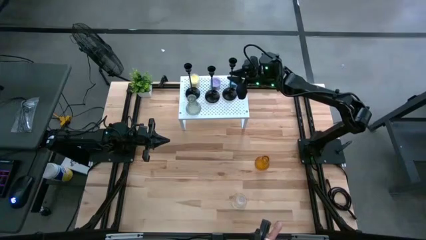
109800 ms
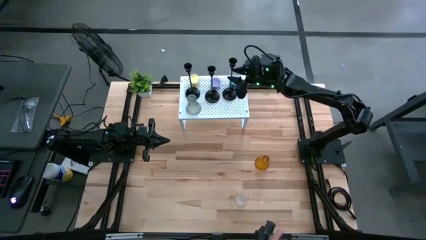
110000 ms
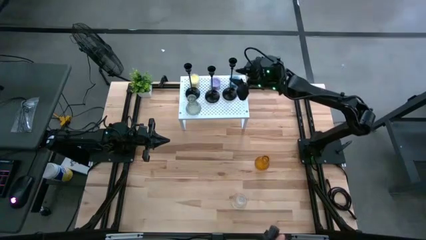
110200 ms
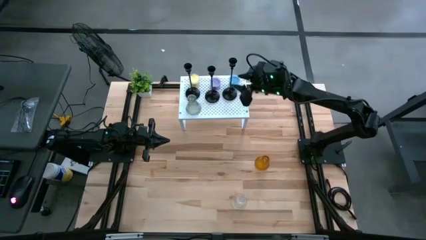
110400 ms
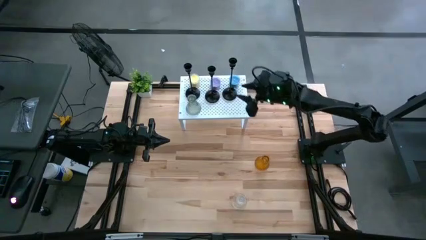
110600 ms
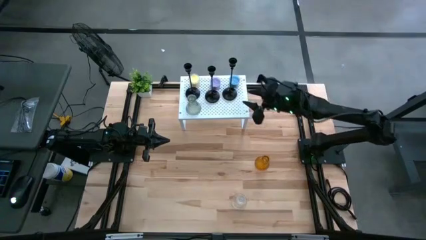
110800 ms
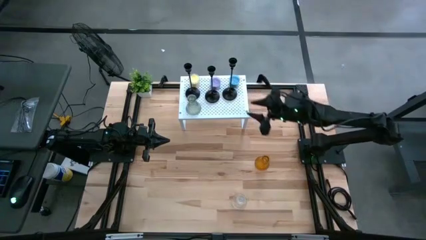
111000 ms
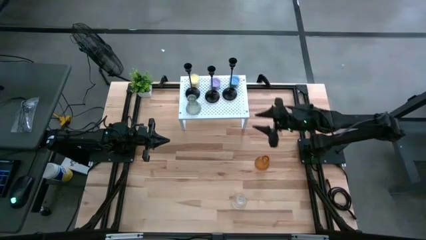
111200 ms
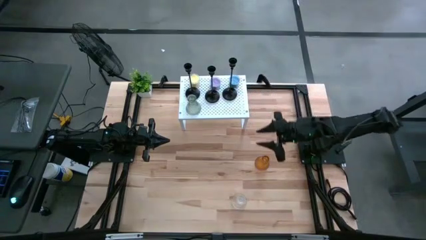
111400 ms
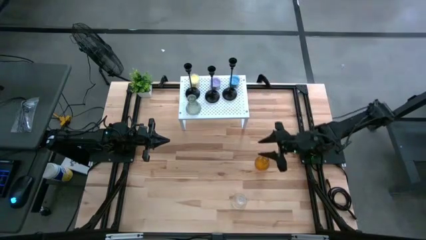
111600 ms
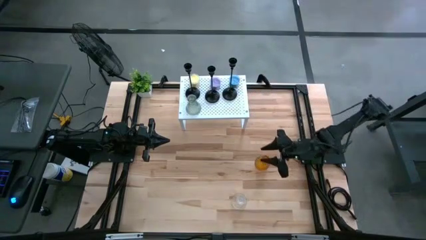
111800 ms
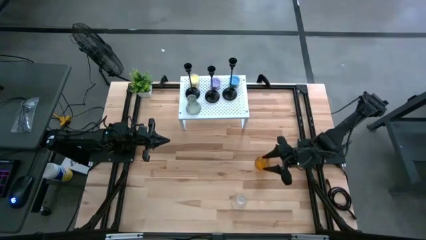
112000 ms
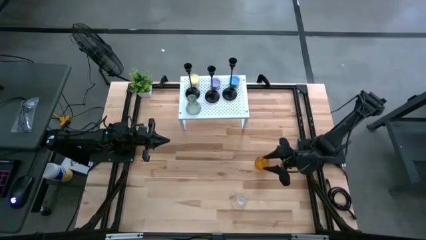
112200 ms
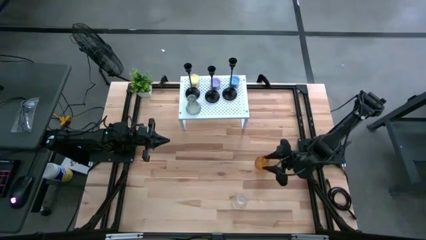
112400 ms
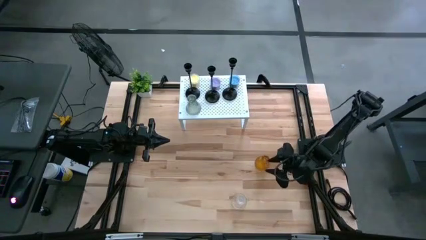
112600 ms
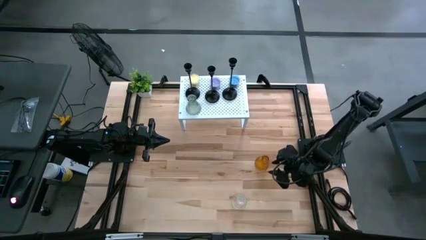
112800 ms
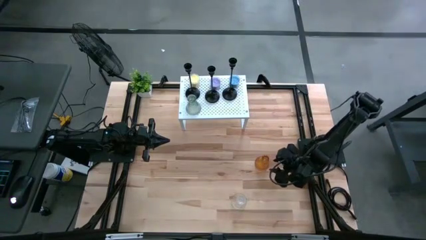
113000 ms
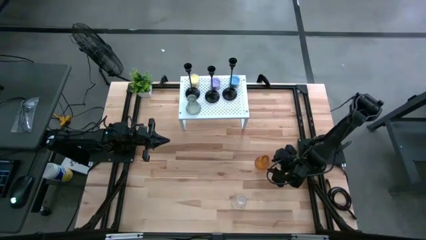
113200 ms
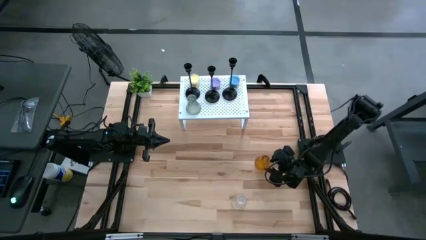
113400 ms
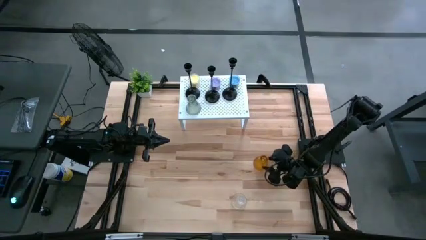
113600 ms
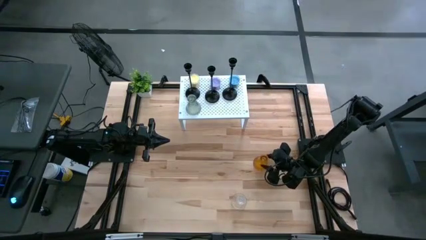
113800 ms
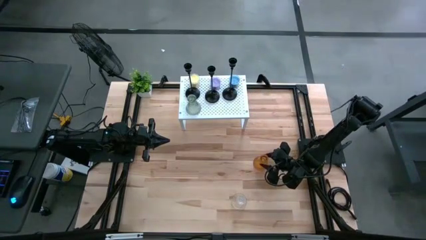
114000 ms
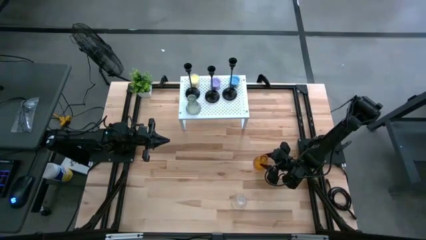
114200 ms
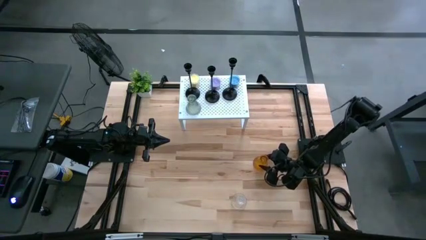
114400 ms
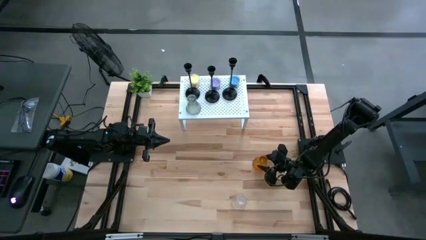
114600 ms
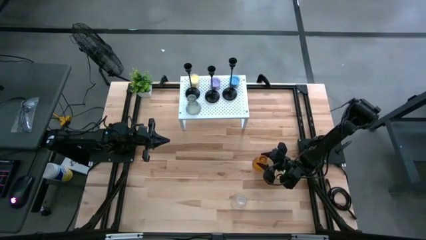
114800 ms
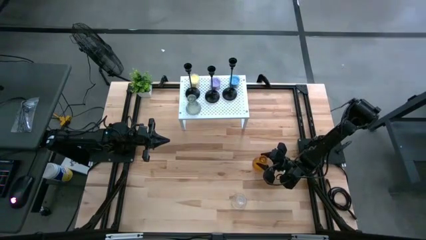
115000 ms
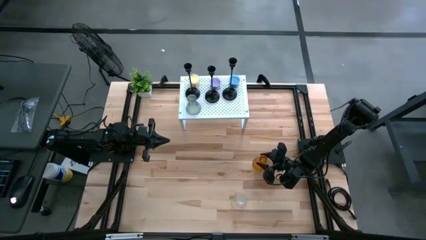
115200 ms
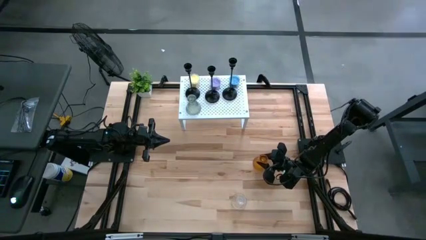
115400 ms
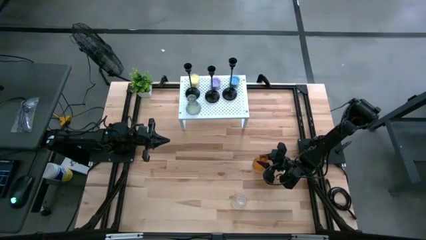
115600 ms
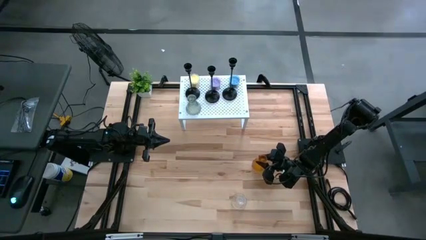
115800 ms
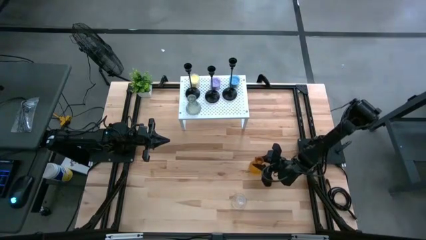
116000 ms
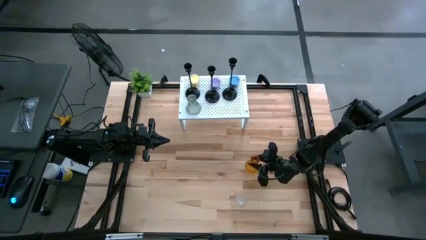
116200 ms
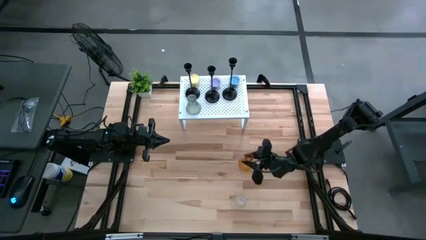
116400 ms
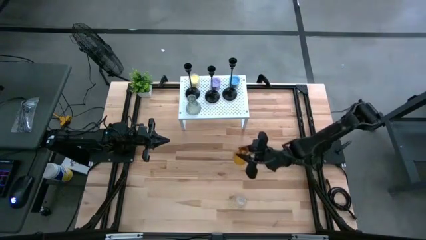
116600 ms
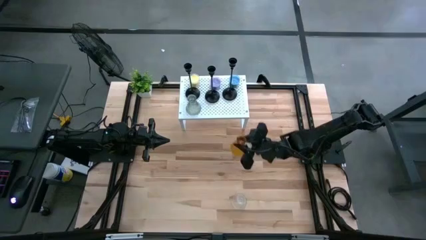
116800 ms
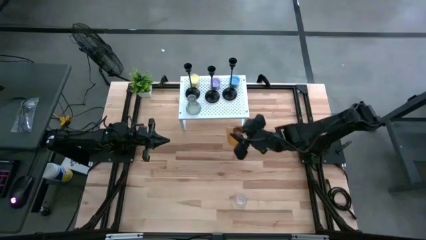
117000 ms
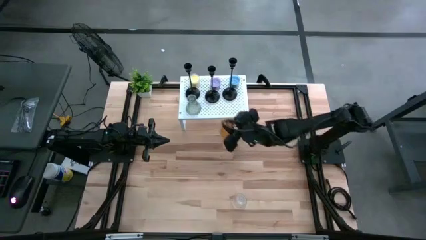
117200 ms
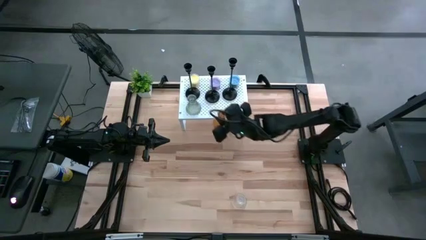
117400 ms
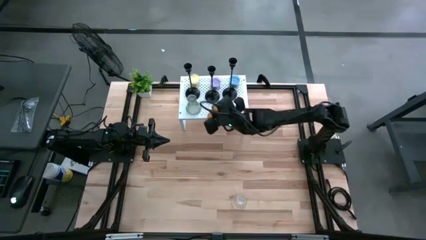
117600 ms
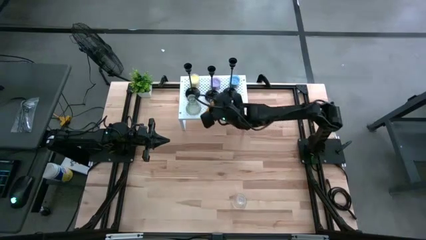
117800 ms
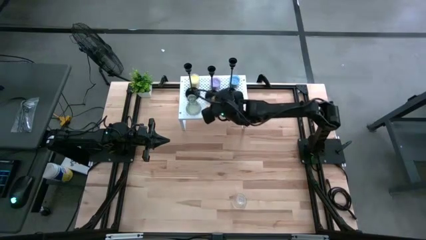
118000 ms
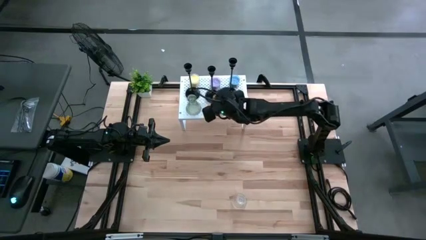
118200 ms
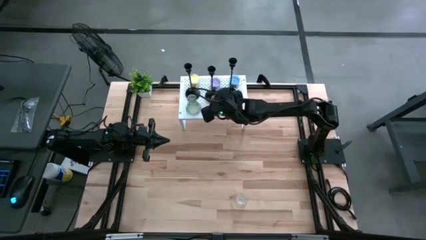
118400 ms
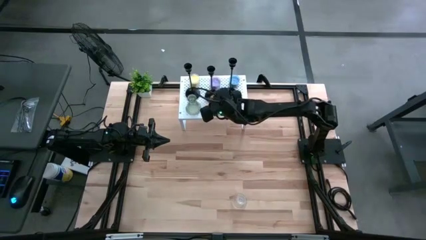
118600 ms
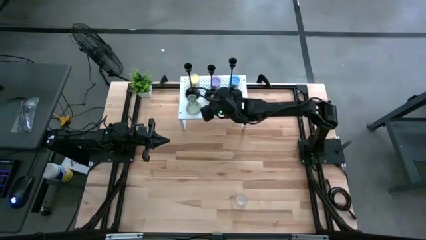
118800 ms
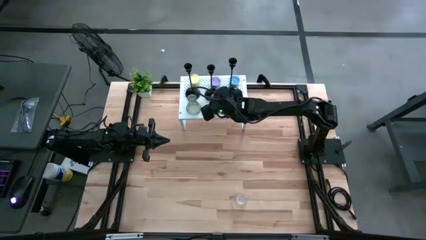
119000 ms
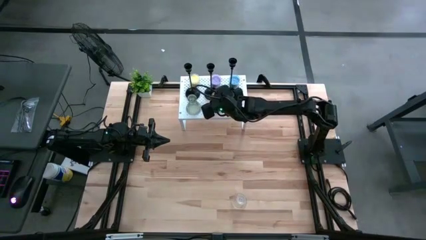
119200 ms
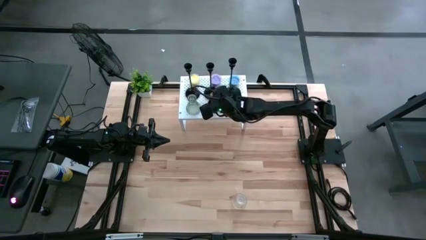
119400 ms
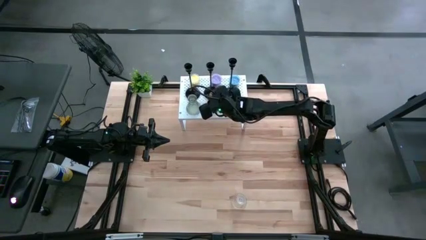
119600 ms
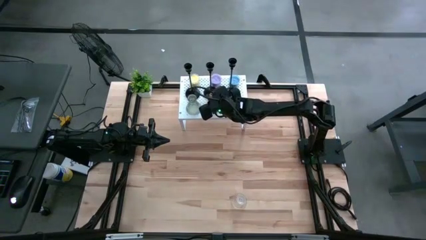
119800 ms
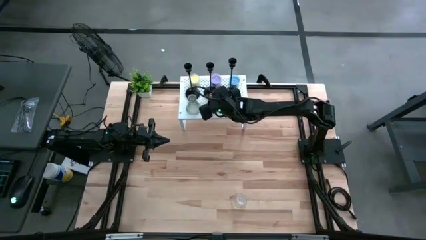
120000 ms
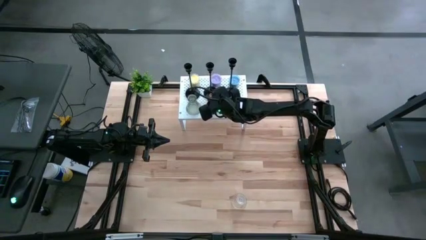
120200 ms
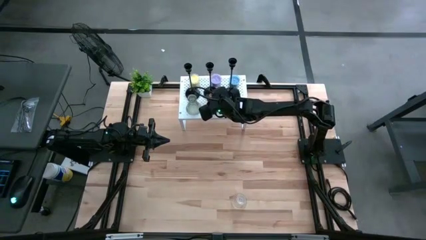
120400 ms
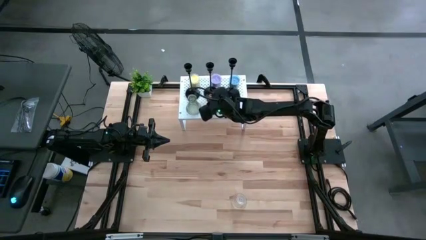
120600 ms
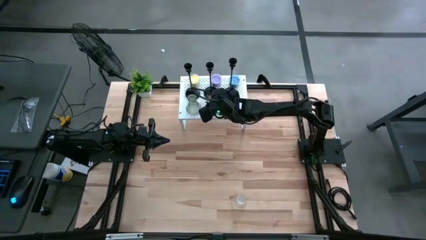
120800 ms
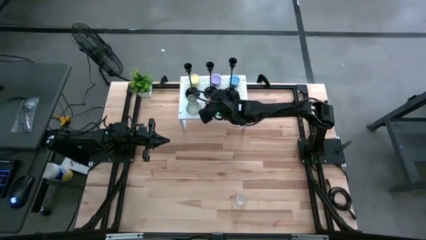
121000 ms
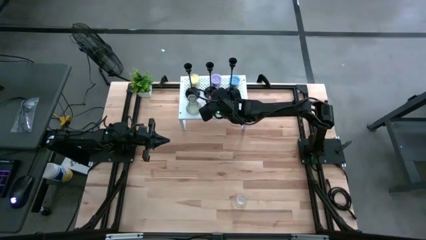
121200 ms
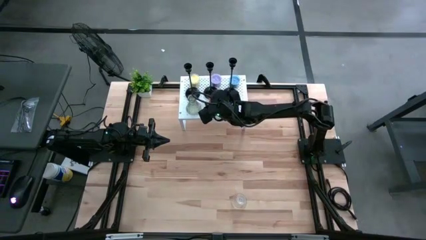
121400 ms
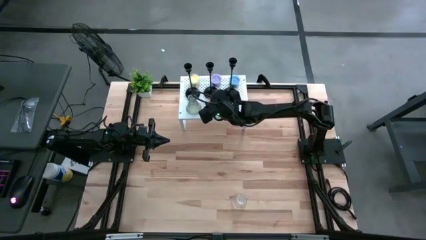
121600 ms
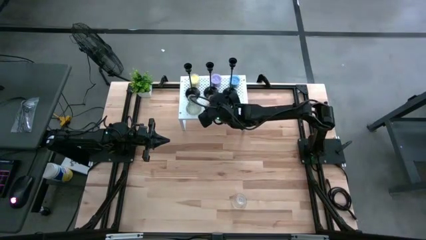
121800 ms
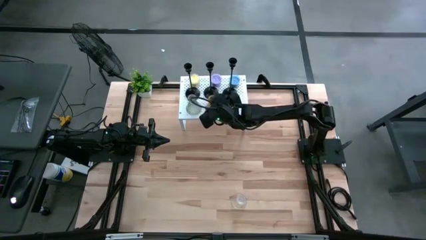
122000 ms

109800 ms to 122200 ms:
Task: Pick & Place candle stick holders
Put the brown glass candle holder on the shelf
